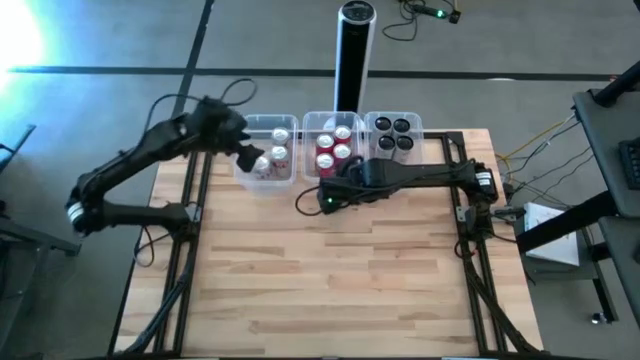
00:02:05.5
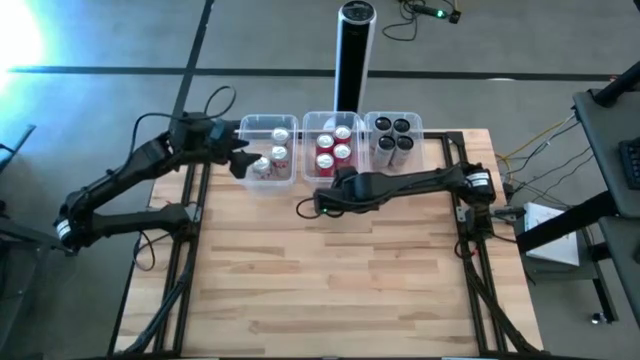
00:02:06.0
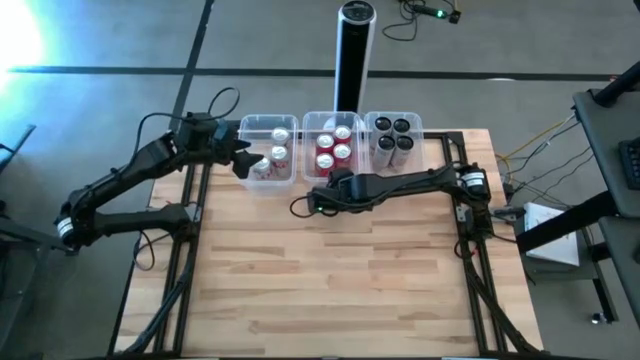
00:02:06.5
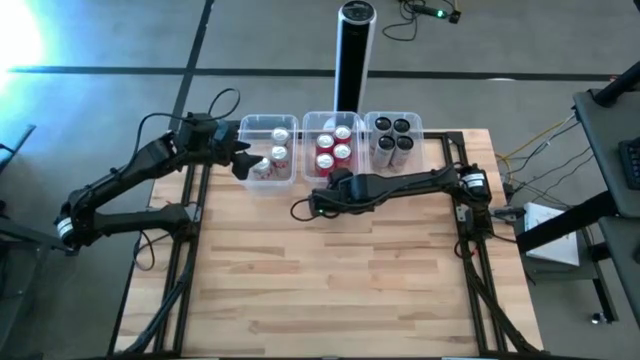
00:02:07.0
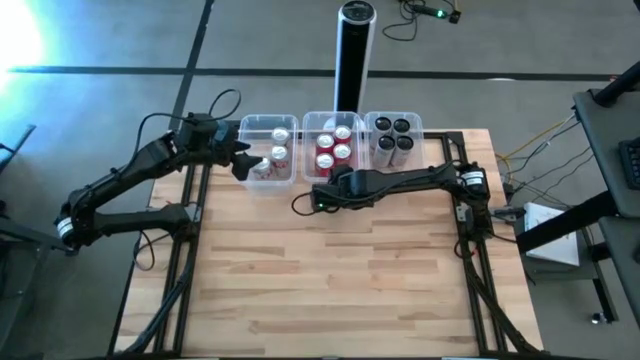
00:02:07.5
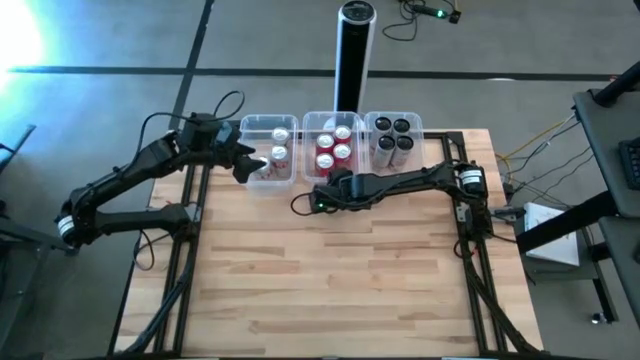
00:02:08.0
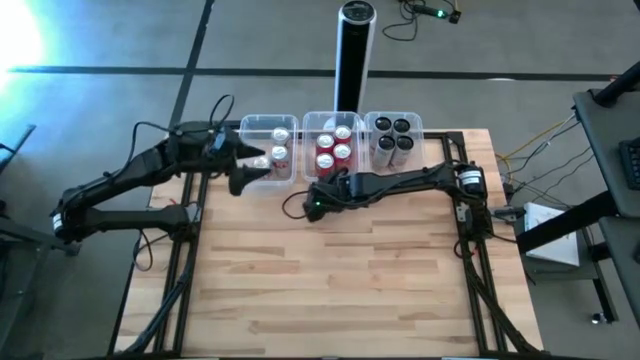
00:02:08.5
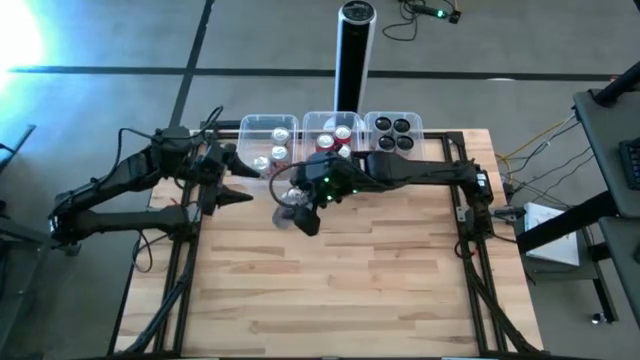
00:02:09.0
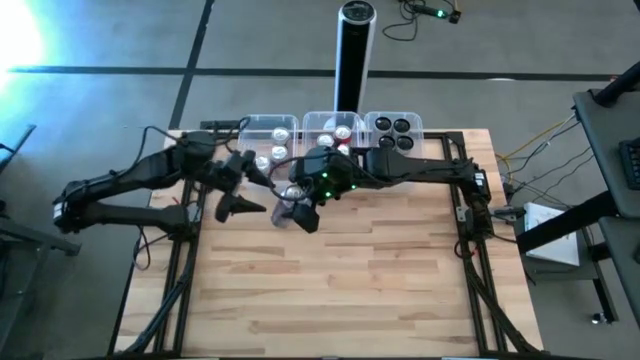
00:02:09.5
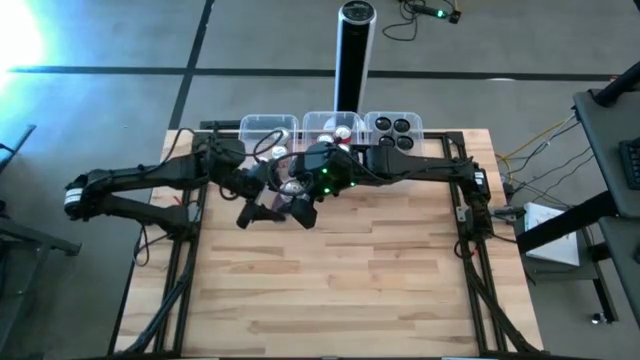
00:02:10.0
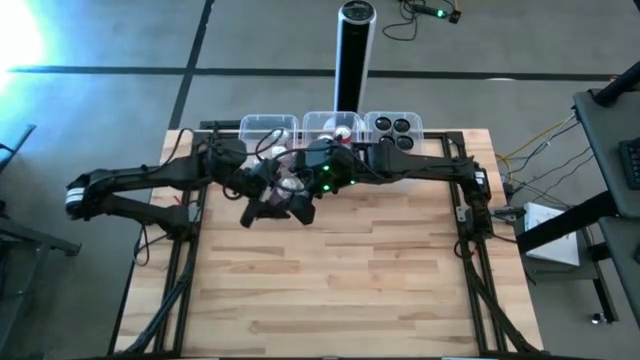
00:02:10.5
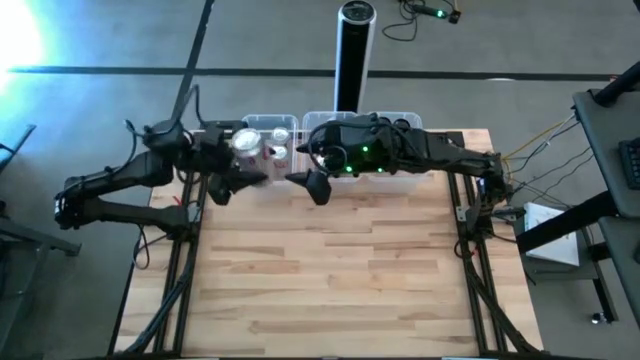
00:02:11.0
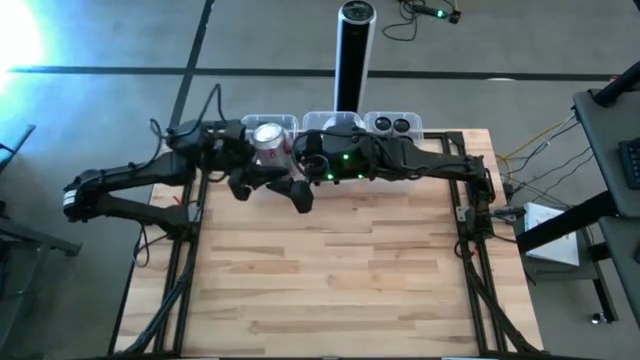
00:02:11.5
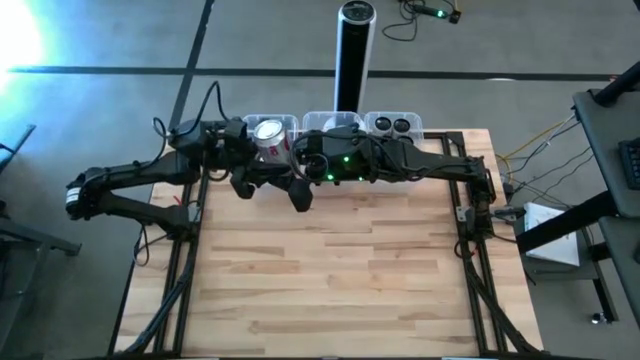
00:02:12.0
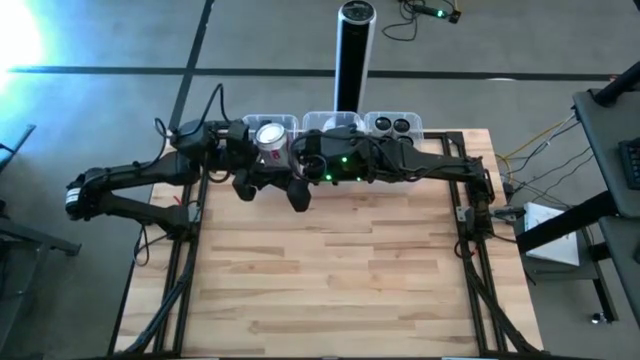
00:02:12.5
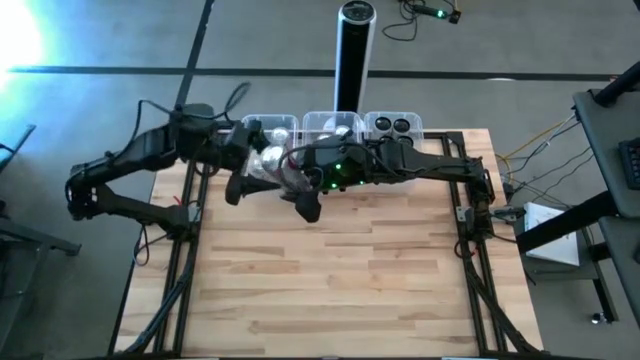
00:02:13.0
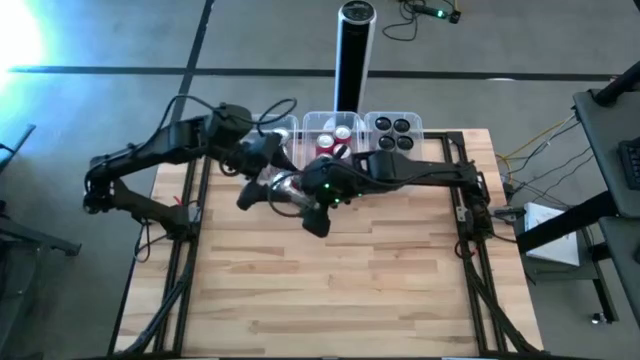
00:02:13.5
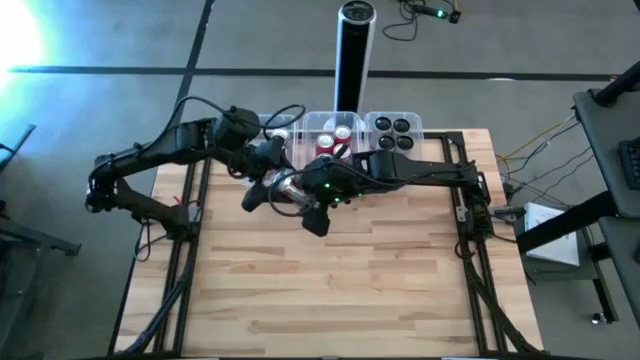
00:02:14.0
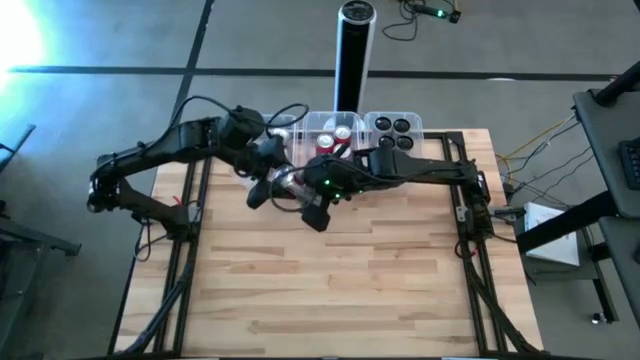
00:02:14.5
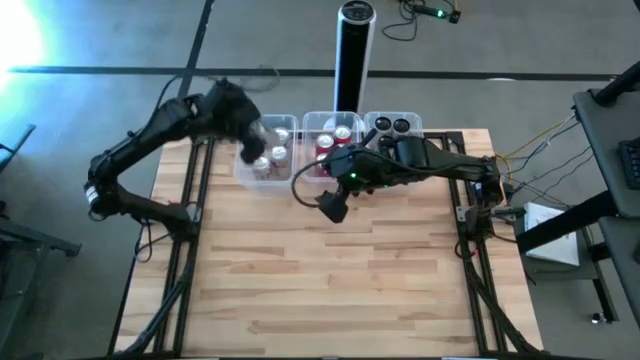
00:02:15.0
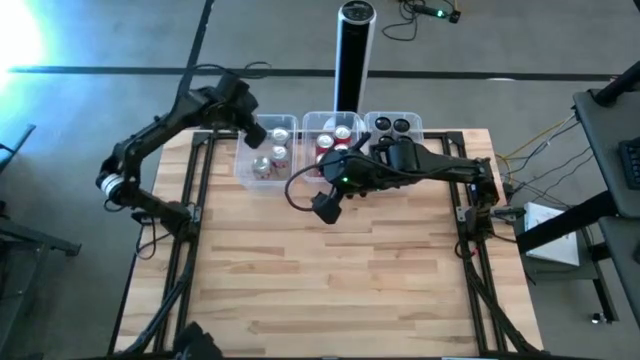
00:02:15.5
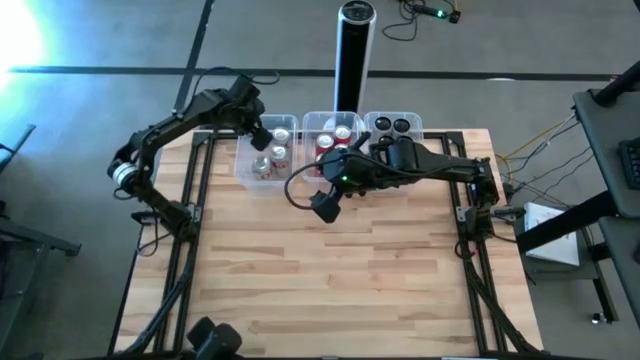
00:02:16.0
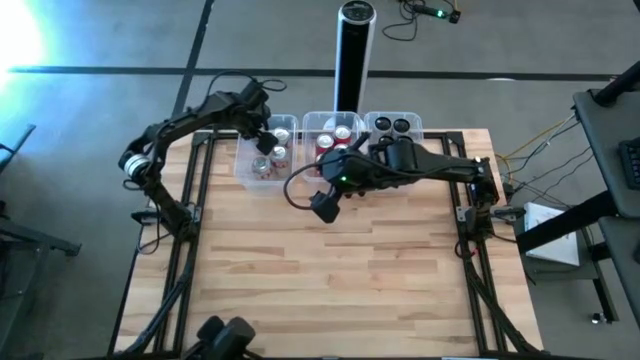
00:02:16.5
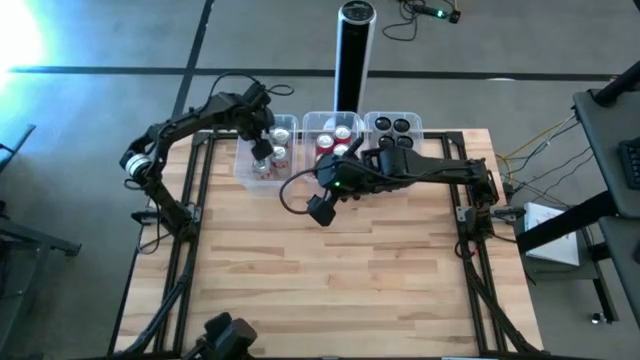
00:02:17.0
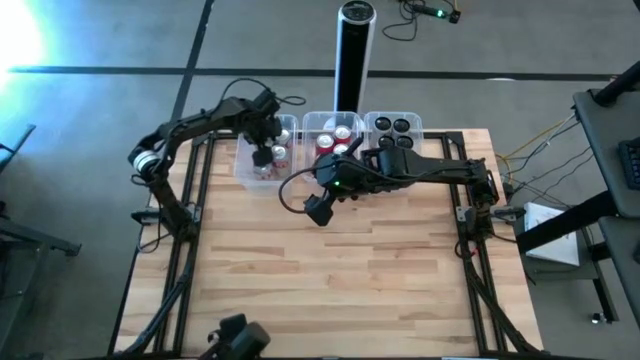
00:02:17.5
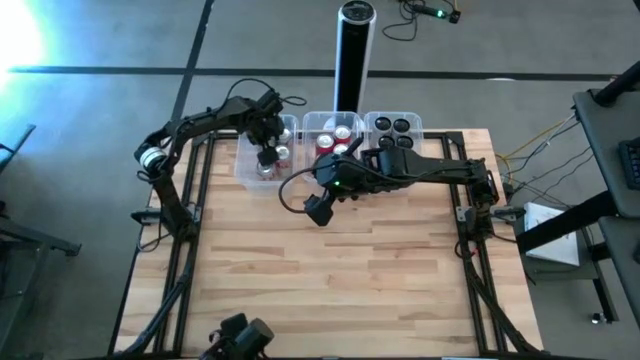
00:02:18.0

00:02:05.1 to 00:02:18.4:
Task: Sort soda cans
Put the white soda can into the left transparent bin

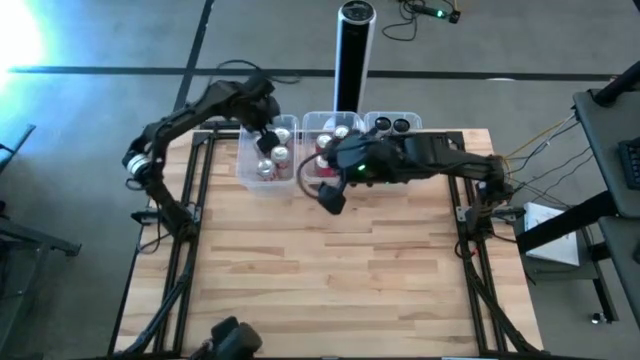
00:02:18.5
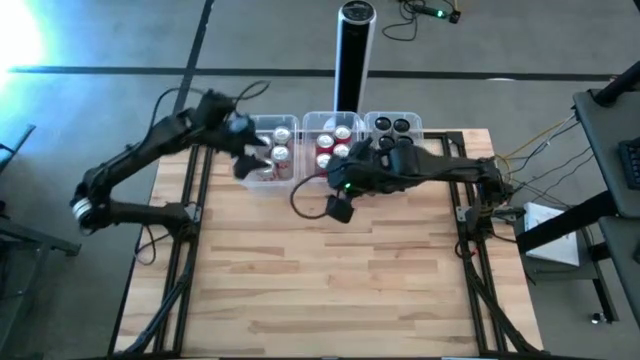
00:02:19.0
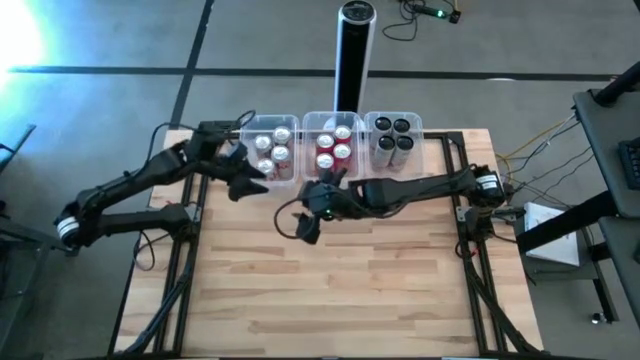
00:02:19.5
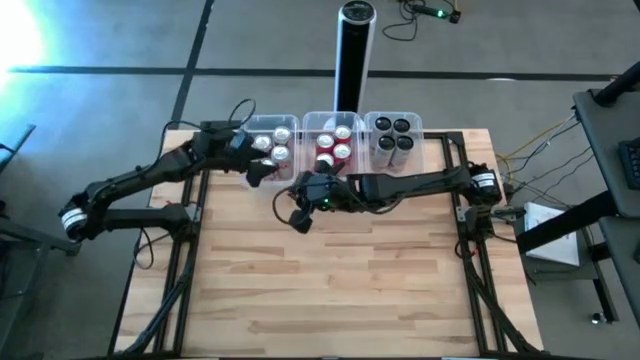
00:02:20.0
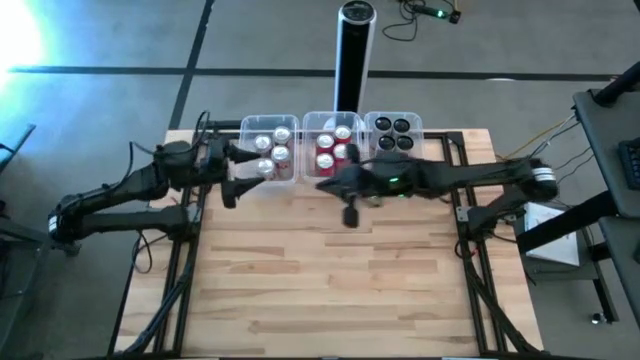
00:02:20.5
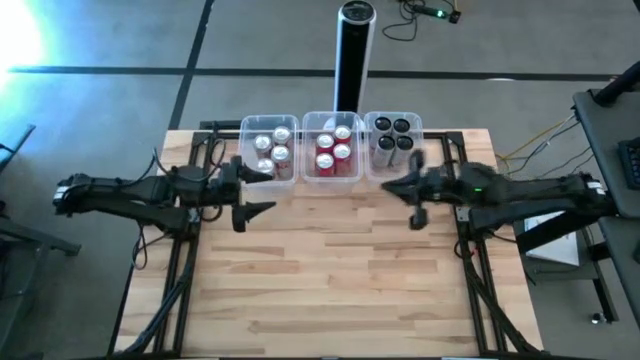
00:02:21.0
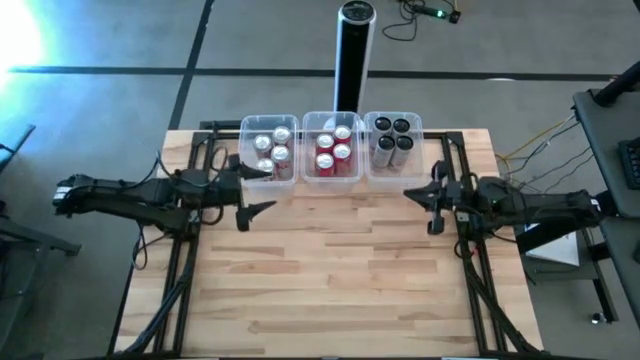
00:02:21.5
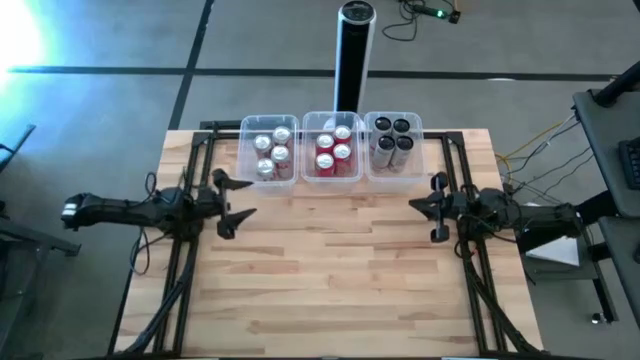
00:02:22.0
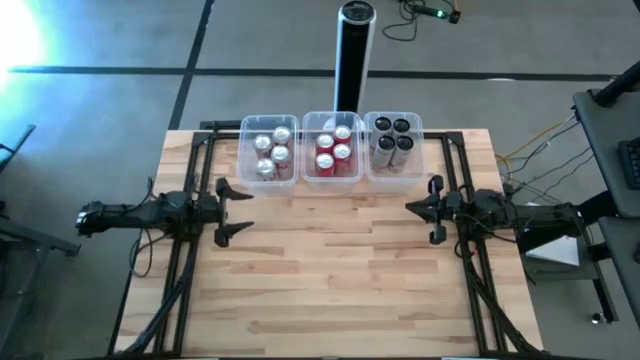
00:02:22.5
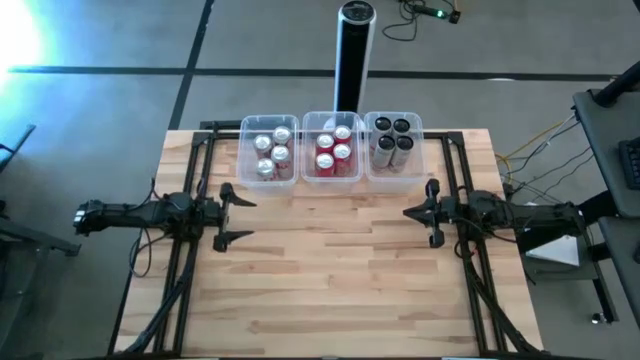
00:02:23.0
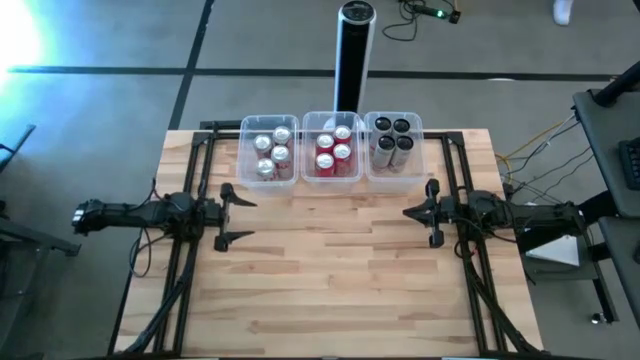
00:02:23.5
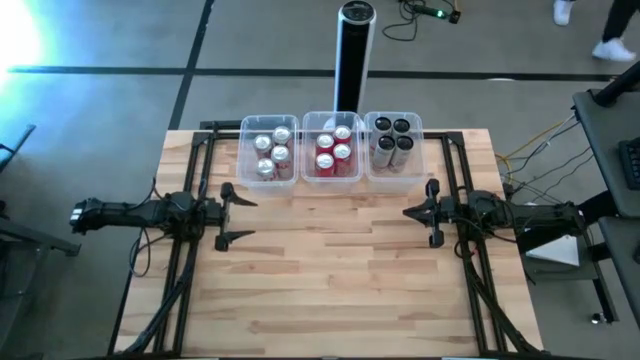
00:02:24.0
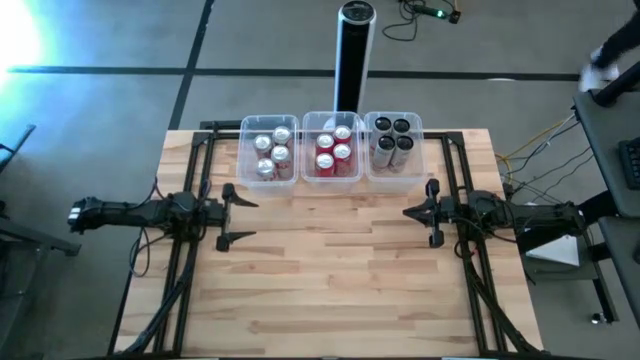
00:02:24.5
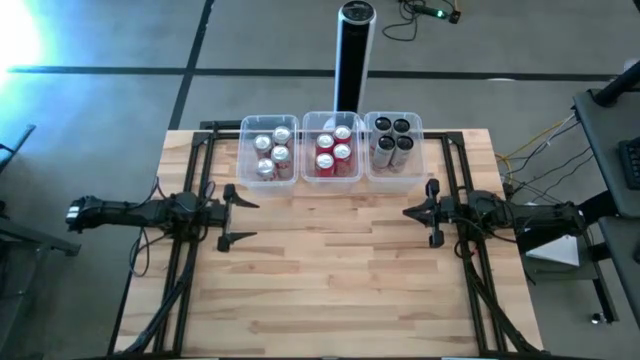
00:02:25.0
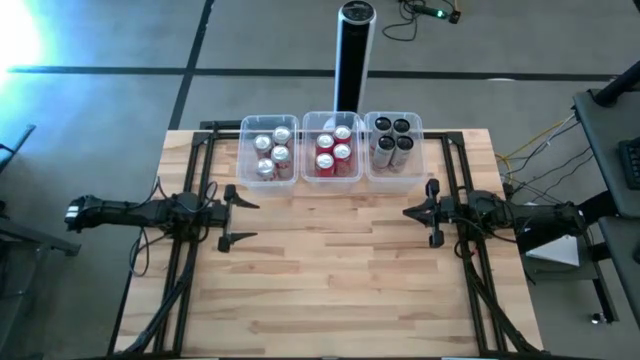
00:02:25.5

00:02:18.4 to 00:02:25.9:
Return to Home Position

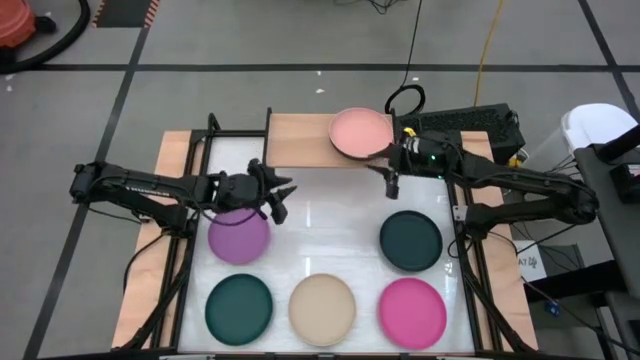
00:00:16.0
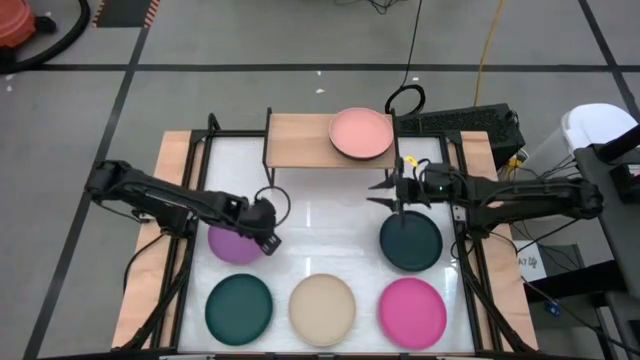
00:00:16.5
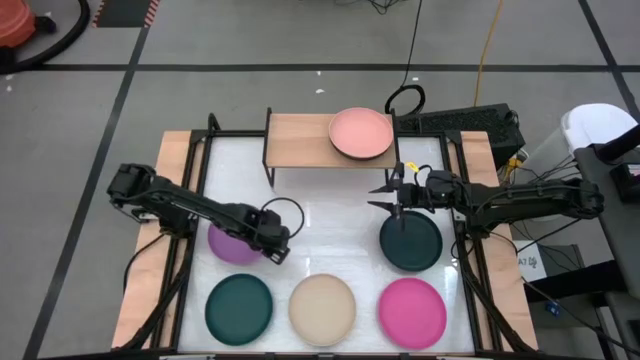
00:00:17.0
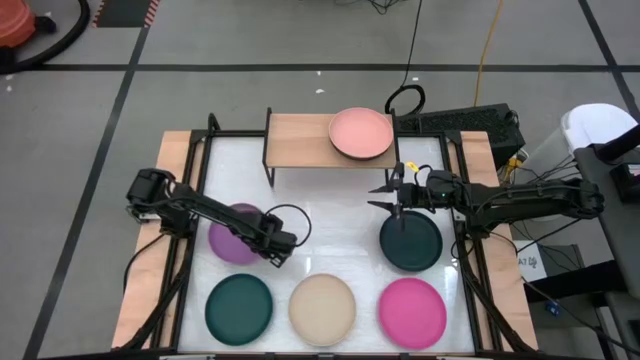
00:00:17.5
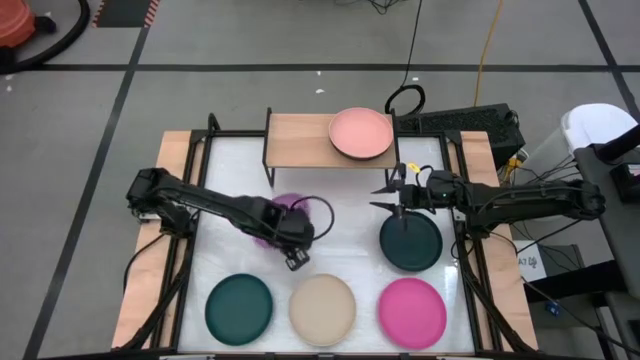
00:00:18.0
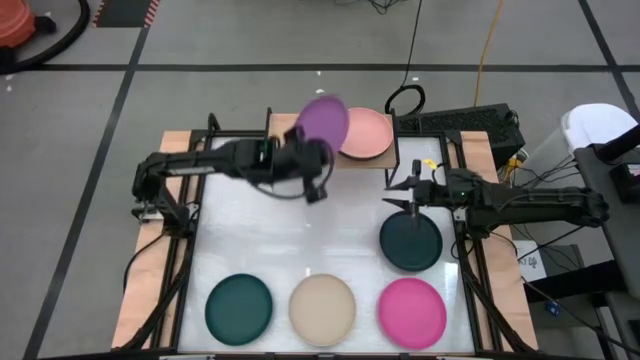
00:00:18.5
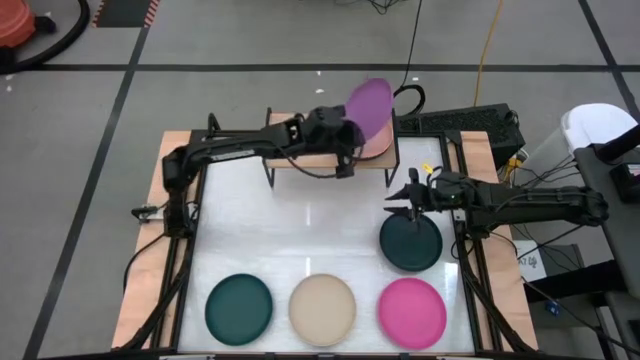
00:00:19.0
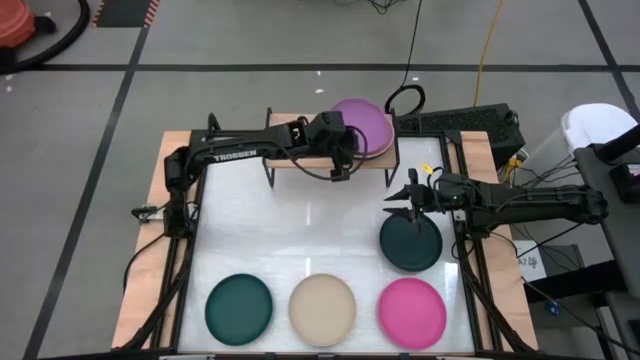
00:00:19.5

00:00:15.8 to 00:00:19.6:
Task: Place and stack plates onto a shelf
Stack the purple plate on top of the light orange plate on the shelf
